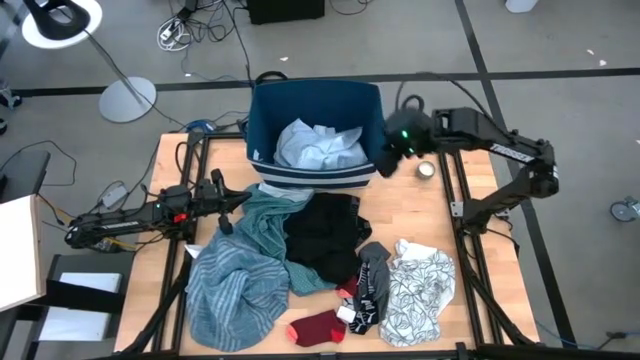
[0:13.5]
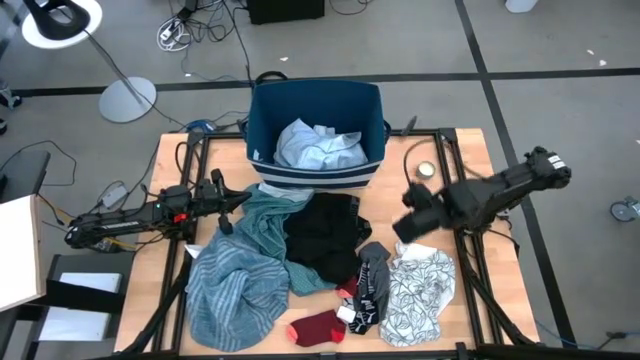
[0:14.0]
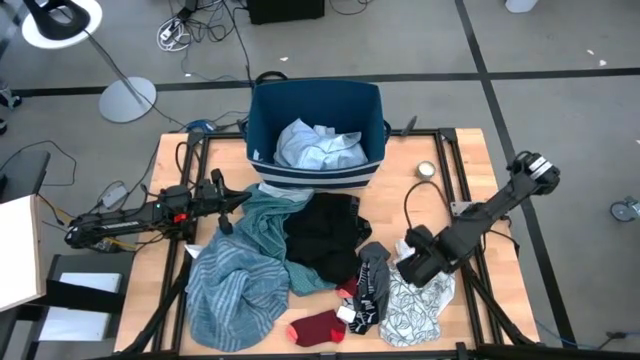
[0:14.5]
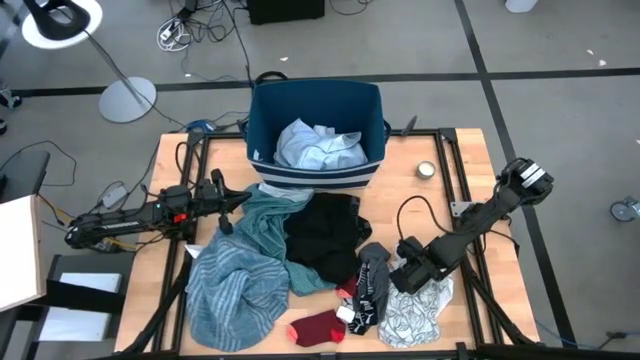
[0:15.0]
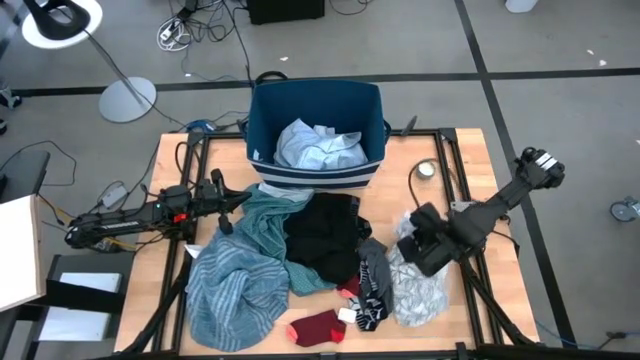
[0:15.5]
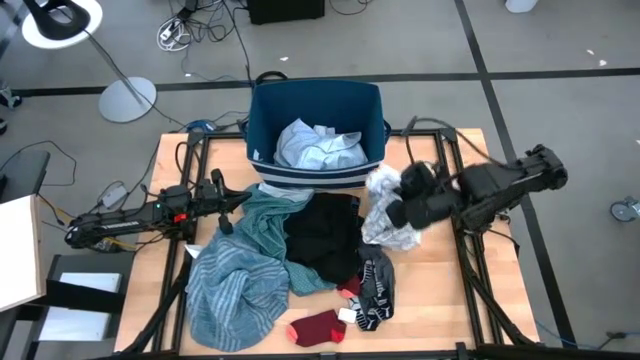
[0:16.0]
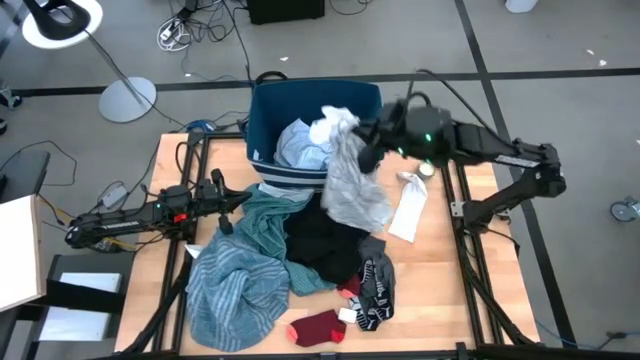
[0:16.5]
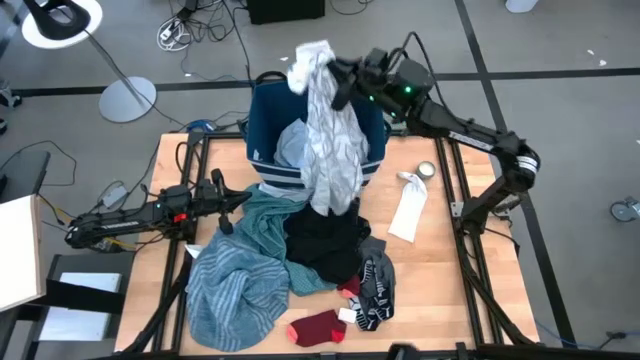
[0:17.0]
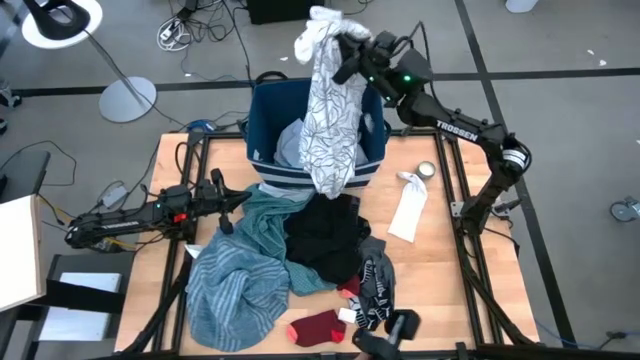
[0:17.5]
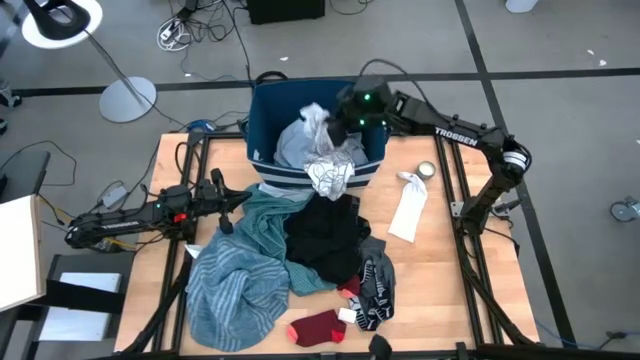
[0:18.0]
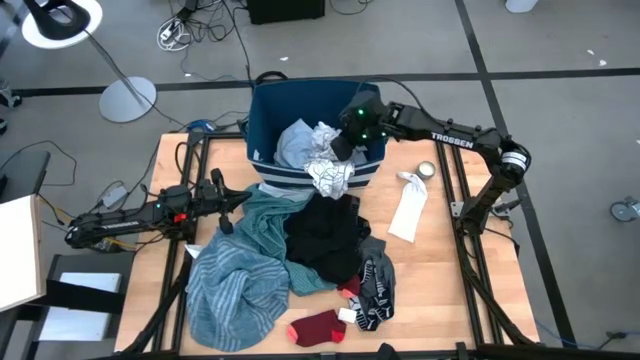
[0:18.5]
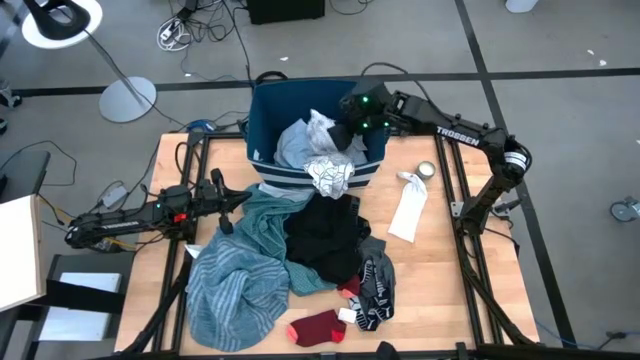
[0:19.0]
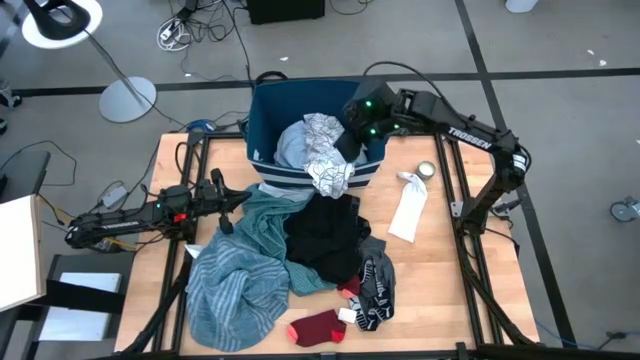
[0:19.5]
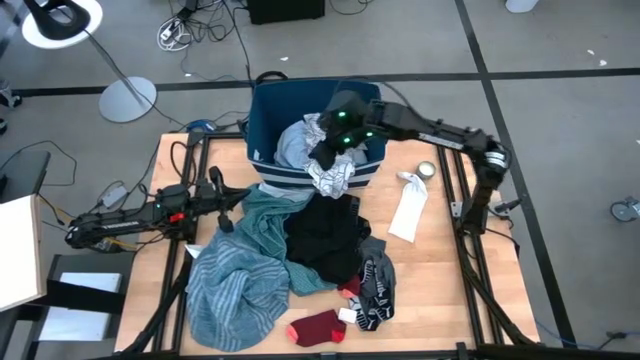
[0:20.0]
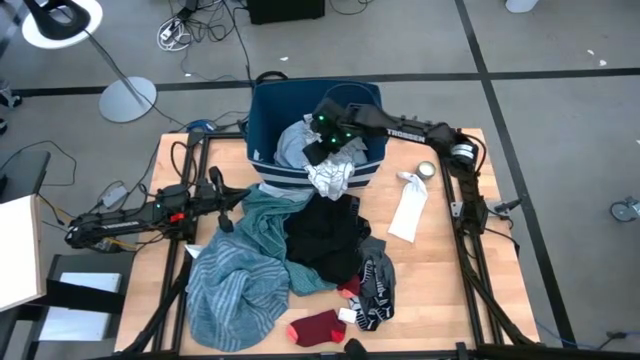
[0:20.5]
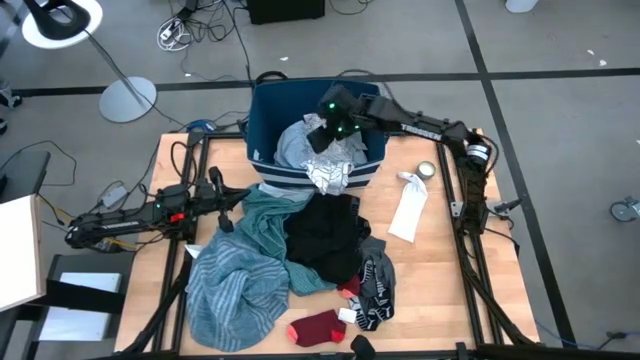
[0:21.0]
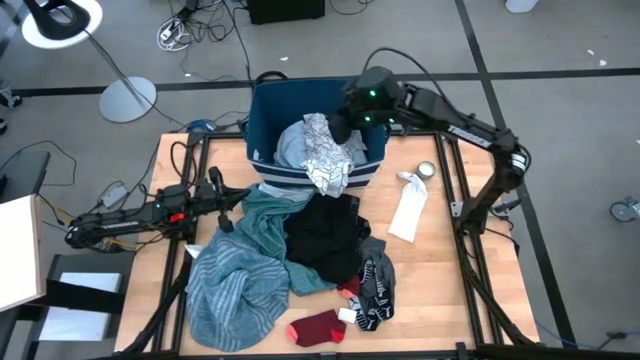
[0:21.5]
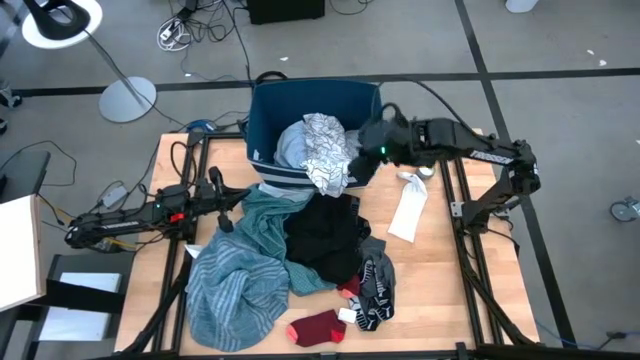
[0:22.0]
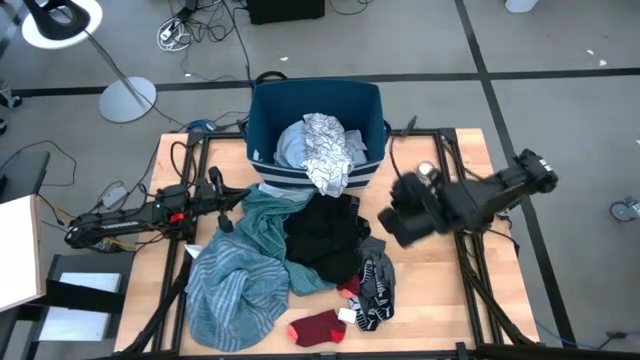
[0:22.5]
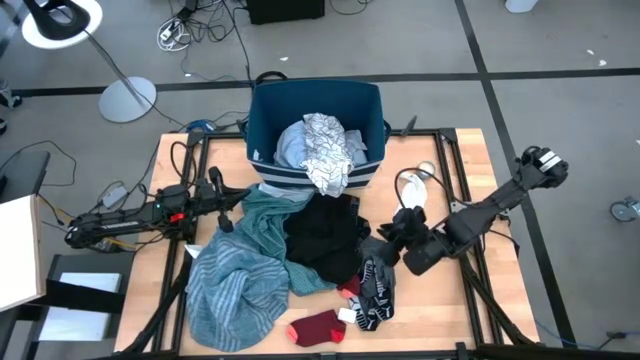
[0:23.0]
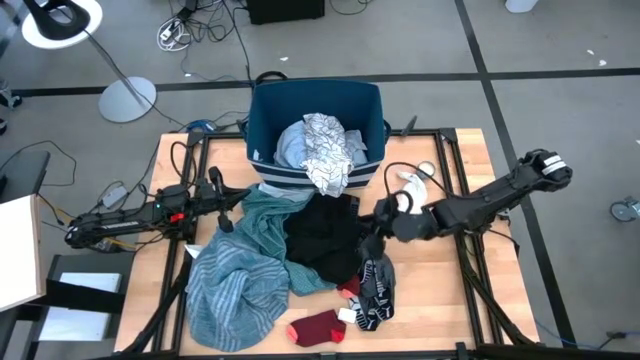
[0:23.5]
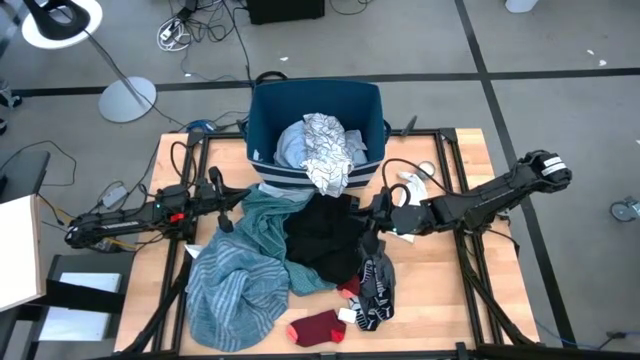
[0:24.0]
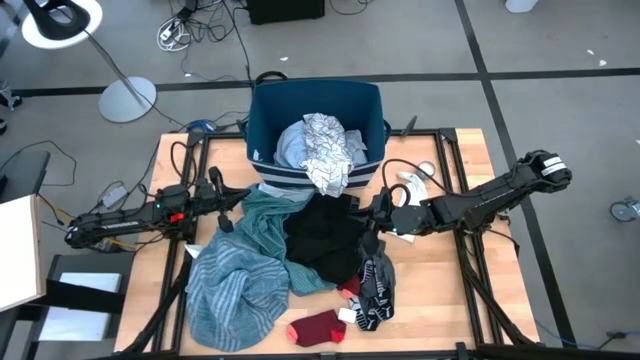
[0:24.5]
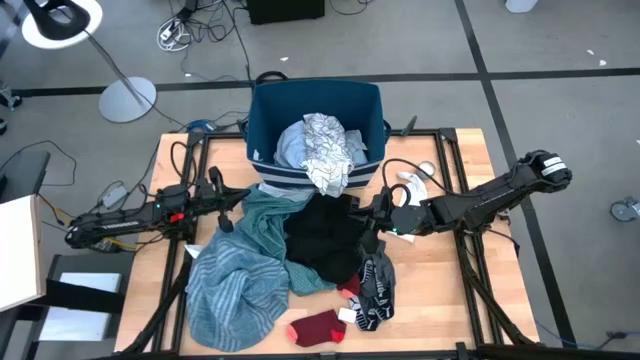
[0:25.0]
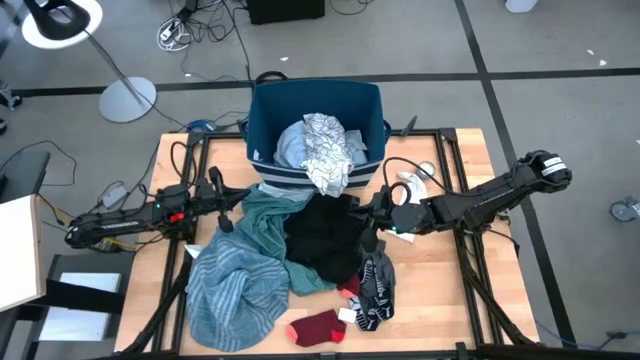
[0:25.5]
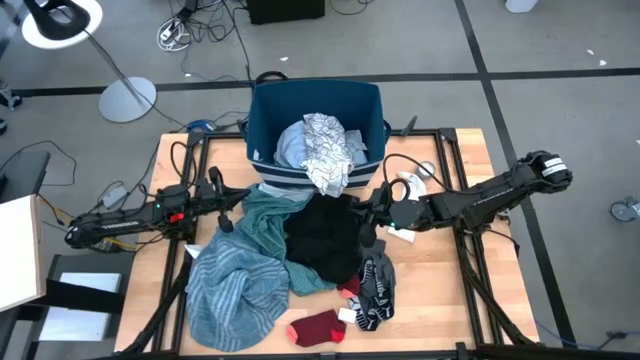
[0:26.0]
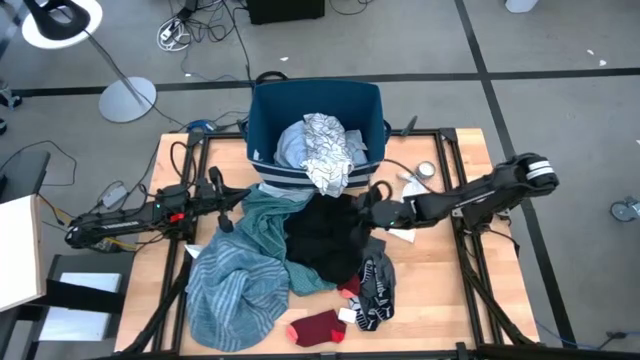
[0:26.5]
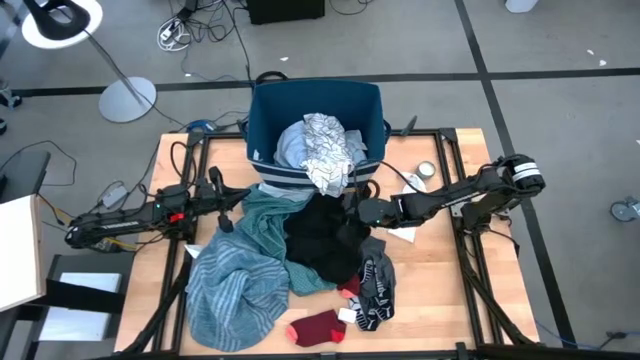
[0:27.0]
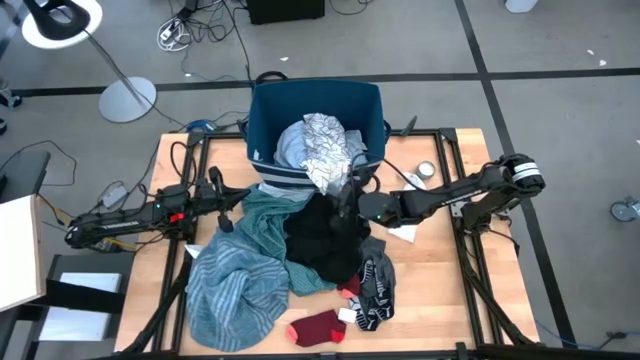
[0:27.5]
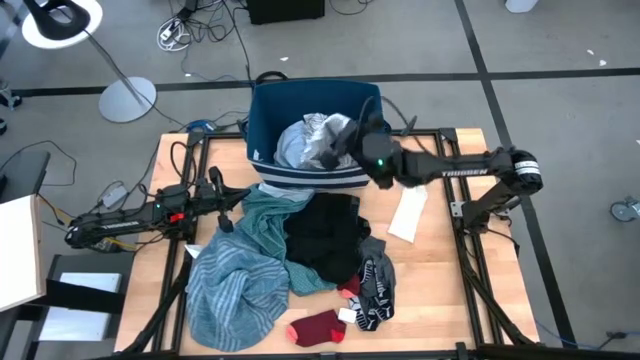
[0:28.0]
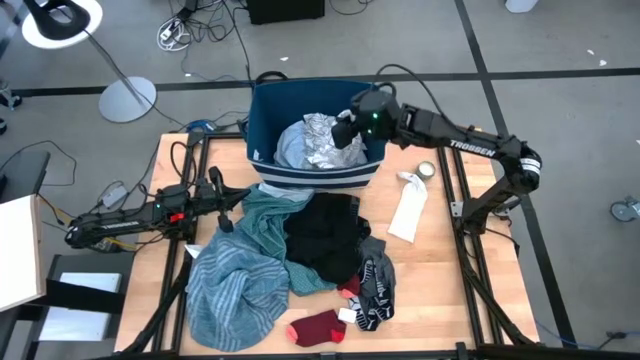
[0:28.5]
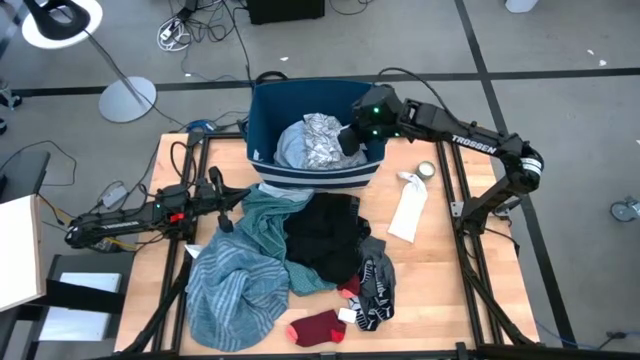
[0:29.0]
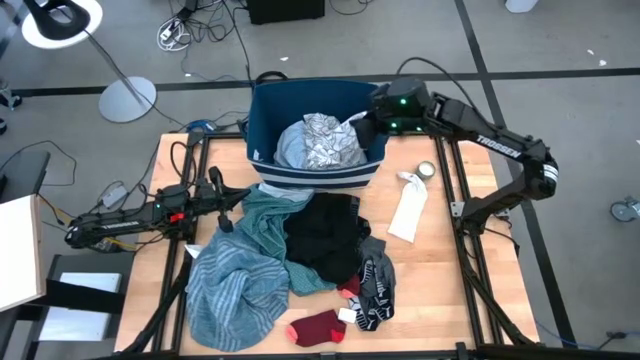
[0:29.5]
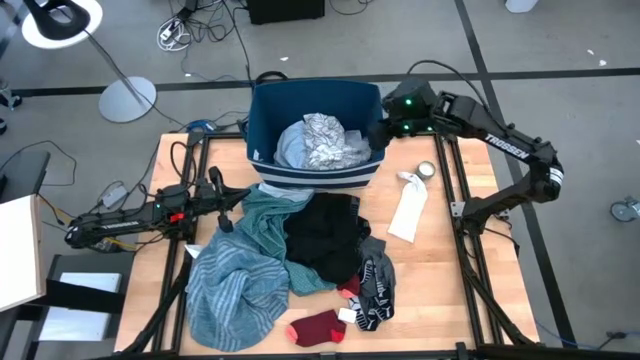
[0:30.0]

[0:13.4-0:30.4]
Task: Sort clothes
Put the white shirt into the blue laundry bin

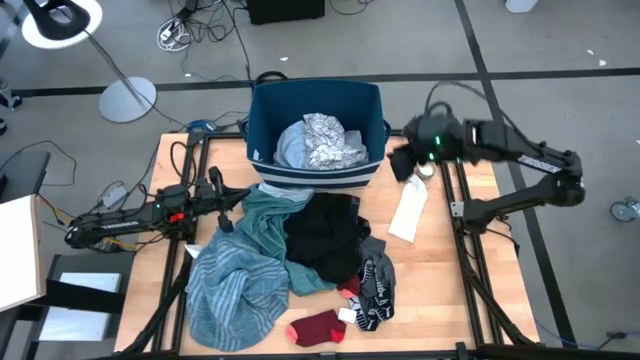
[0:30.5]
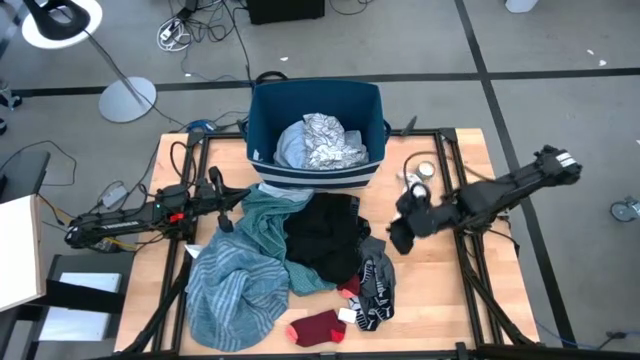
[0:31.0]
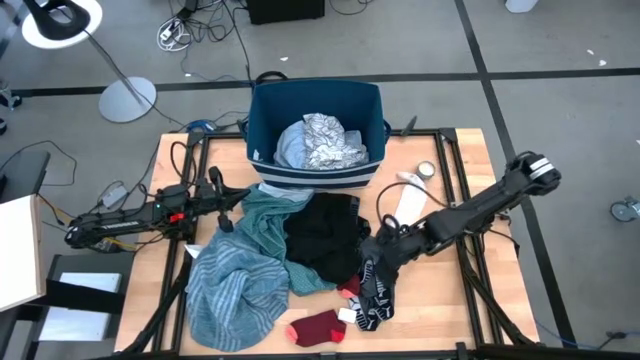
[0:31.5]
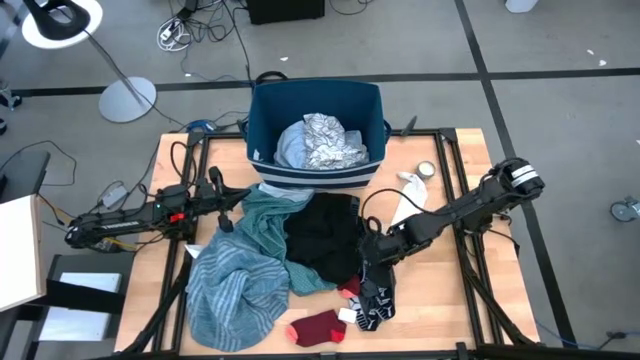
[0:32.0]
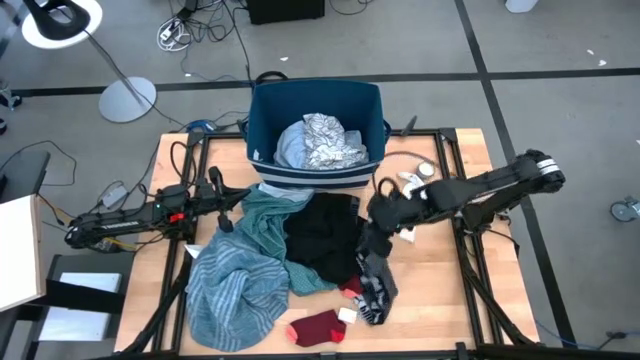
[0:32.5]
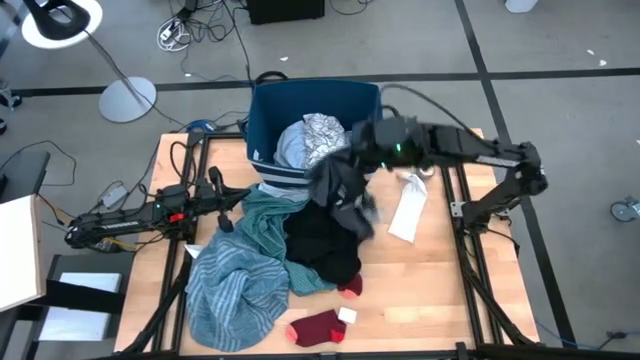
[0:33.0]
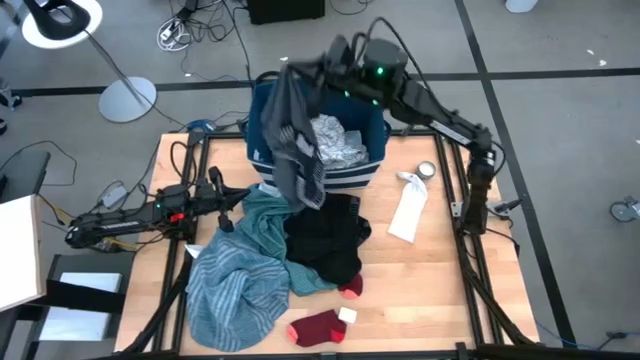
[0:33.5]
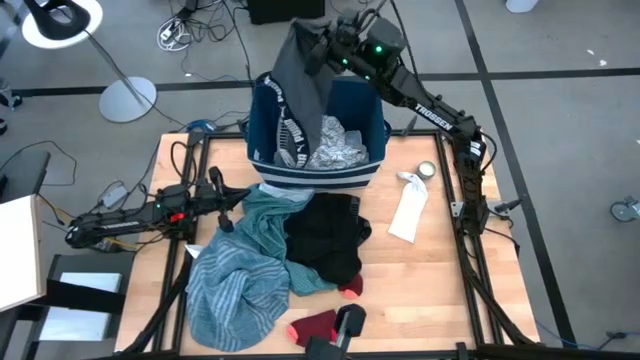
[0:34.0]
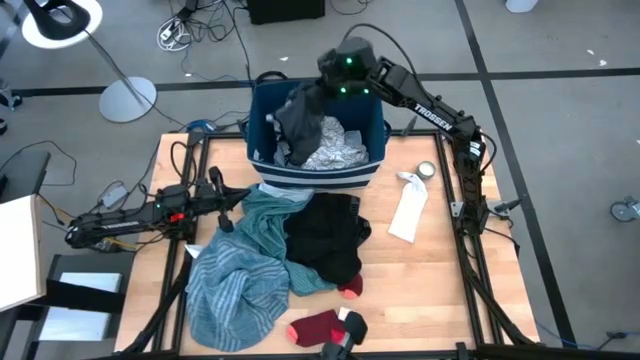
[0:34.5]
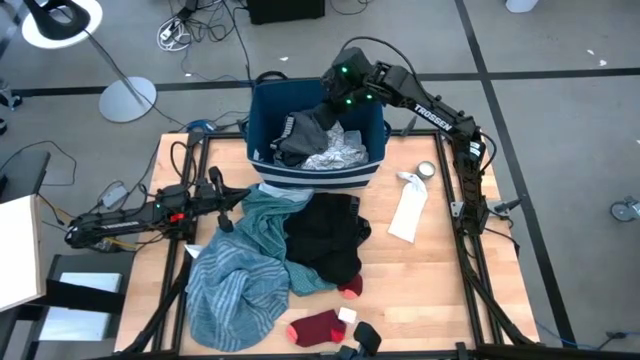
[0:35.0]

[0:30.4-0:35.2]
Put the gray boxer into the blue laundry bin
